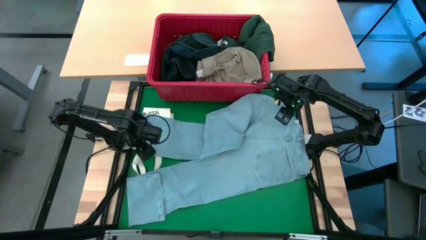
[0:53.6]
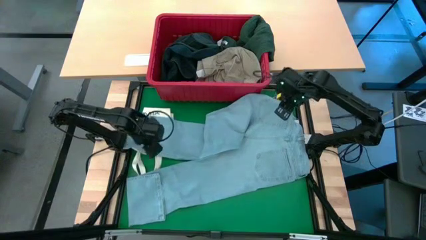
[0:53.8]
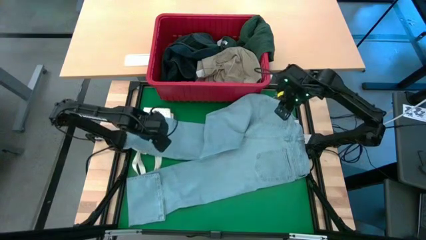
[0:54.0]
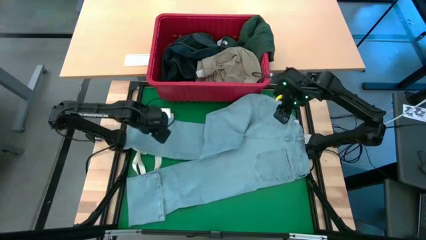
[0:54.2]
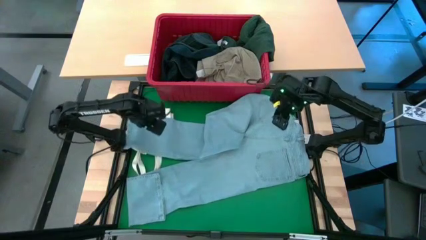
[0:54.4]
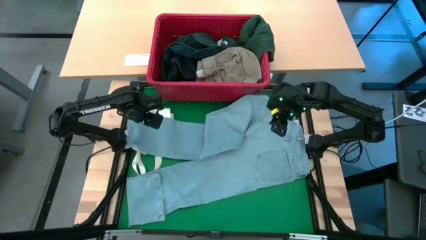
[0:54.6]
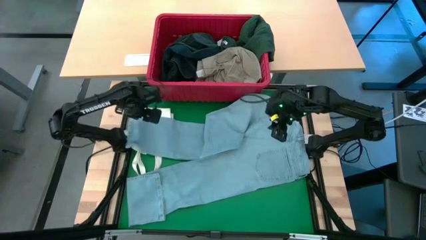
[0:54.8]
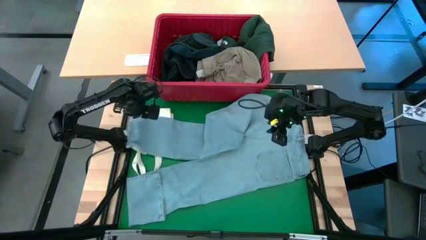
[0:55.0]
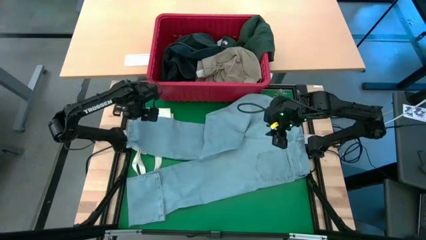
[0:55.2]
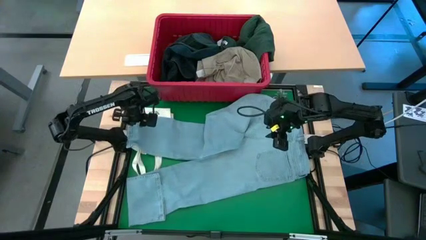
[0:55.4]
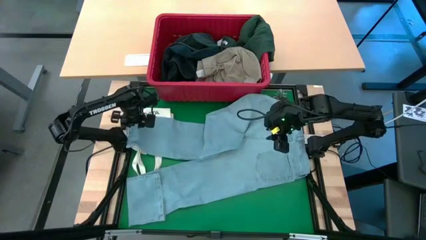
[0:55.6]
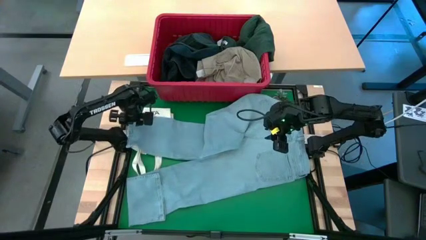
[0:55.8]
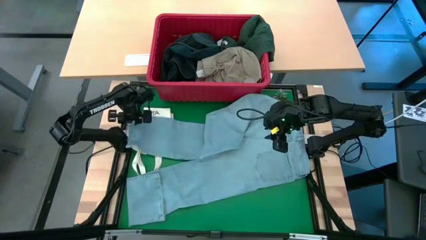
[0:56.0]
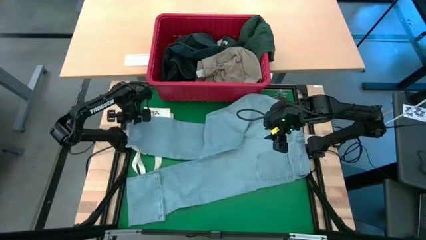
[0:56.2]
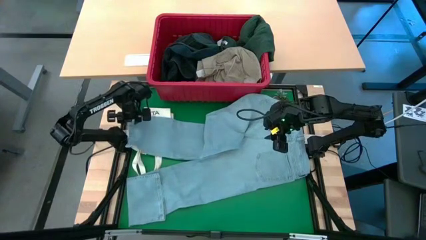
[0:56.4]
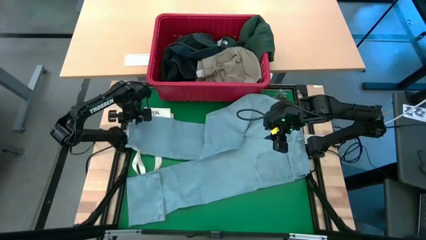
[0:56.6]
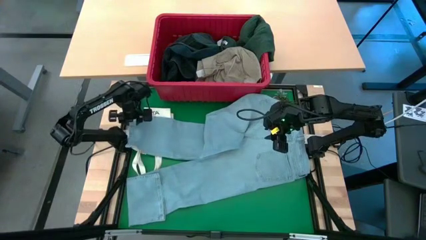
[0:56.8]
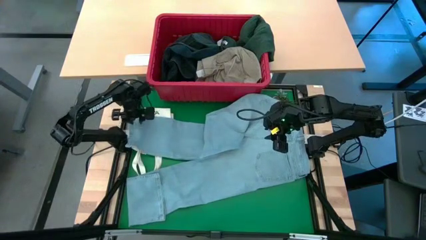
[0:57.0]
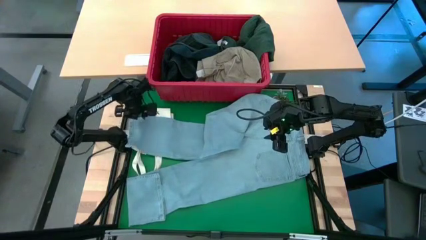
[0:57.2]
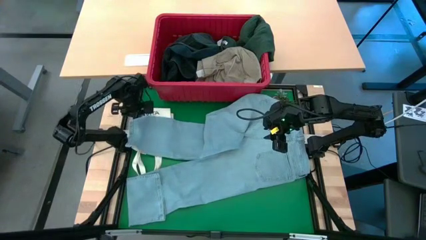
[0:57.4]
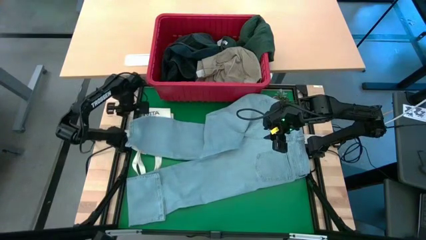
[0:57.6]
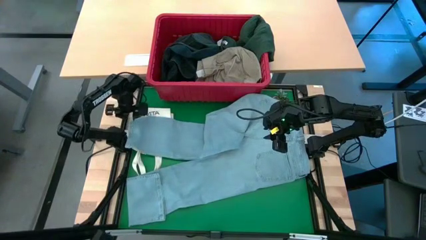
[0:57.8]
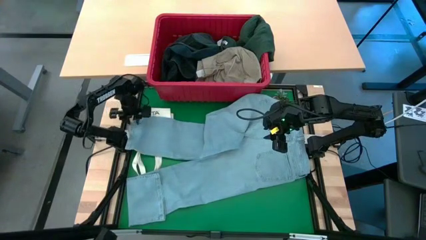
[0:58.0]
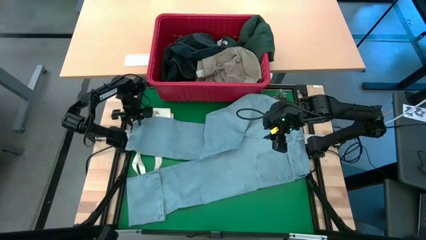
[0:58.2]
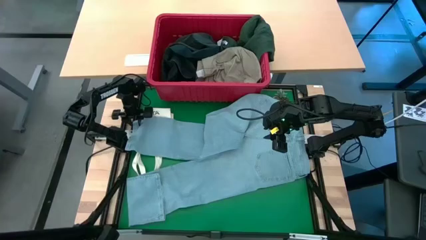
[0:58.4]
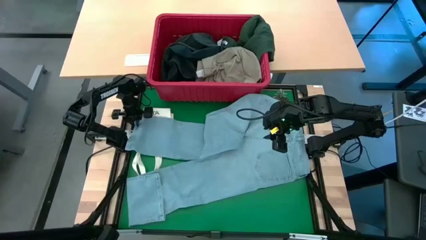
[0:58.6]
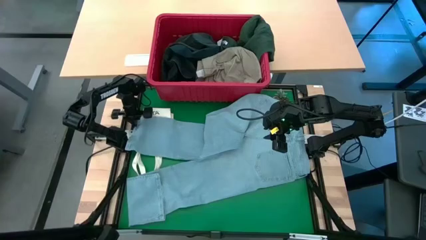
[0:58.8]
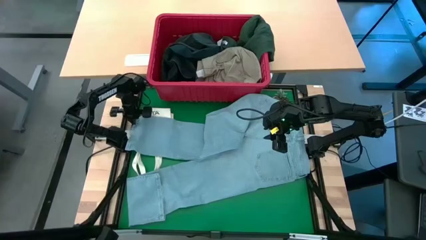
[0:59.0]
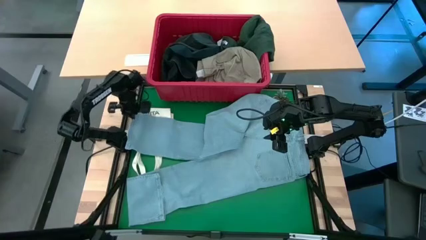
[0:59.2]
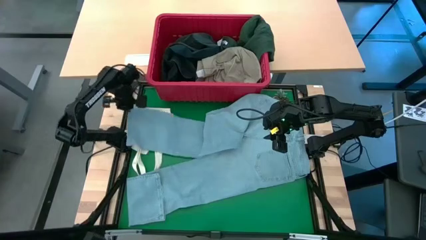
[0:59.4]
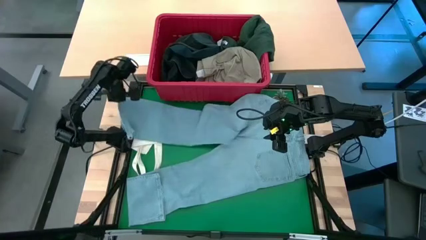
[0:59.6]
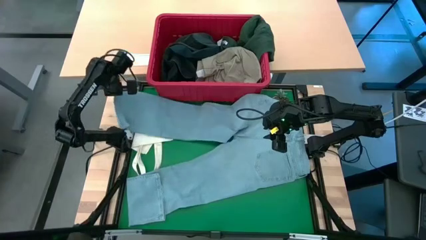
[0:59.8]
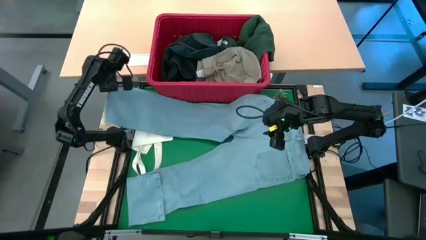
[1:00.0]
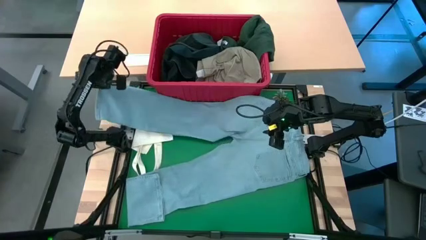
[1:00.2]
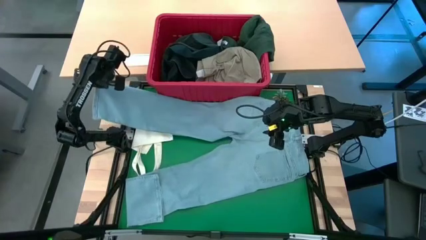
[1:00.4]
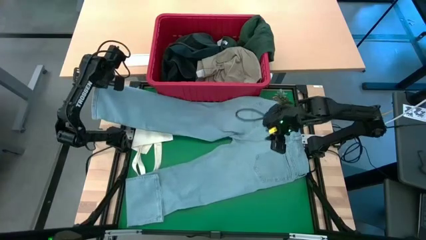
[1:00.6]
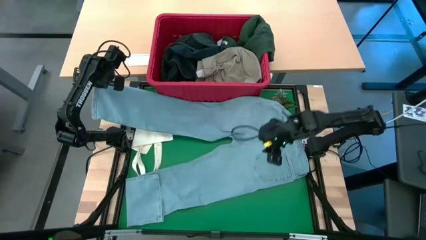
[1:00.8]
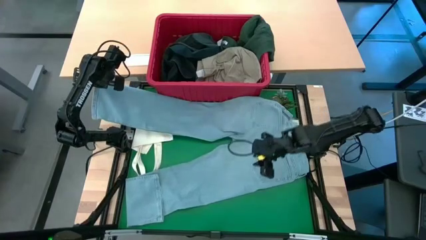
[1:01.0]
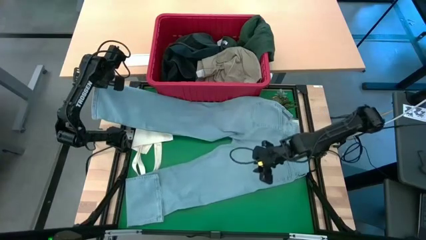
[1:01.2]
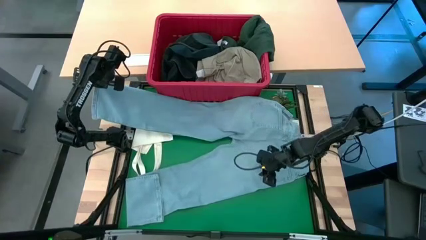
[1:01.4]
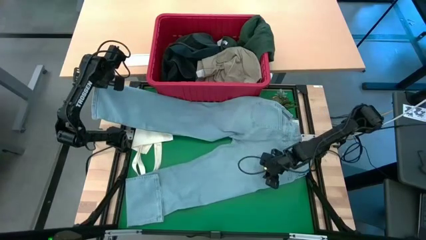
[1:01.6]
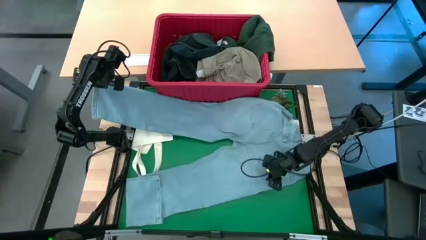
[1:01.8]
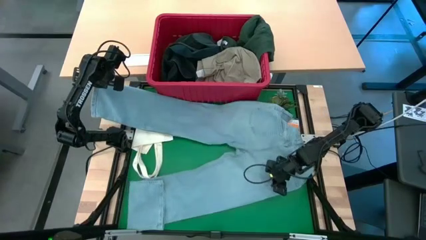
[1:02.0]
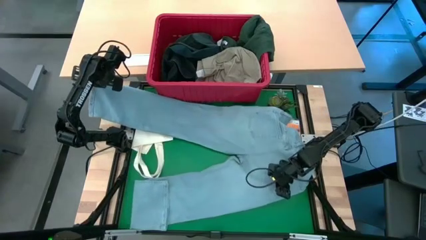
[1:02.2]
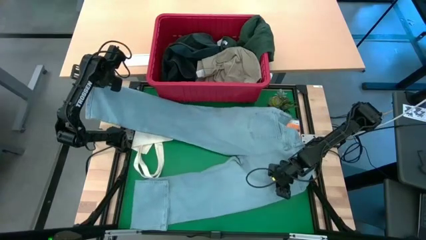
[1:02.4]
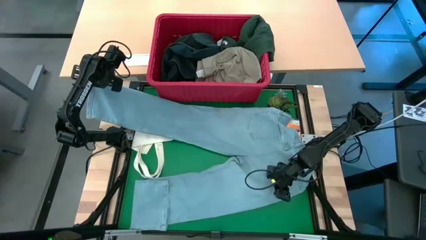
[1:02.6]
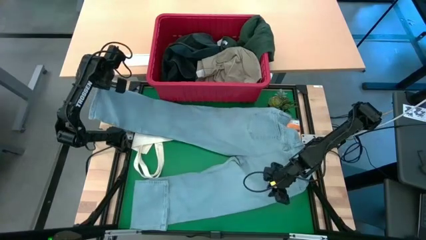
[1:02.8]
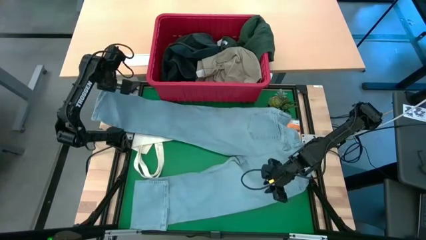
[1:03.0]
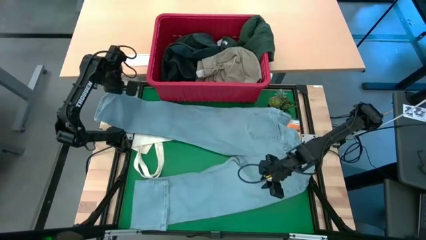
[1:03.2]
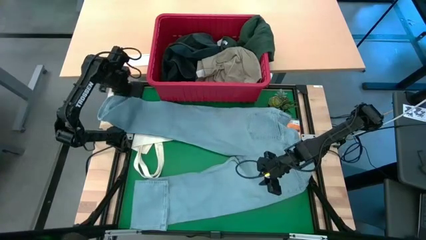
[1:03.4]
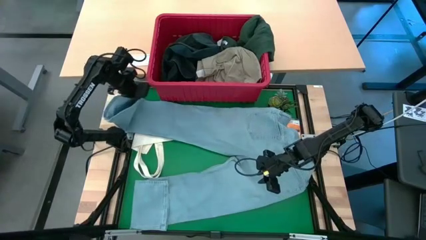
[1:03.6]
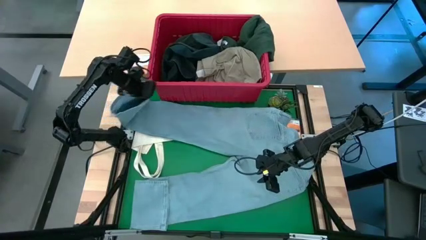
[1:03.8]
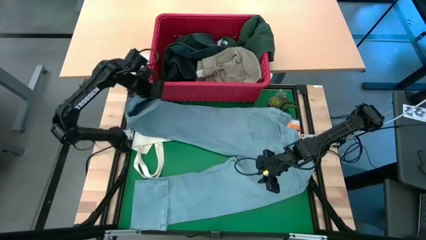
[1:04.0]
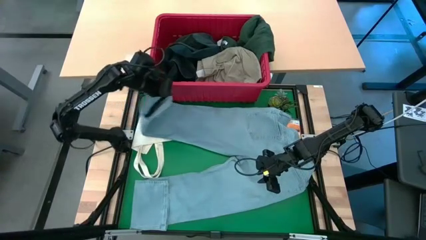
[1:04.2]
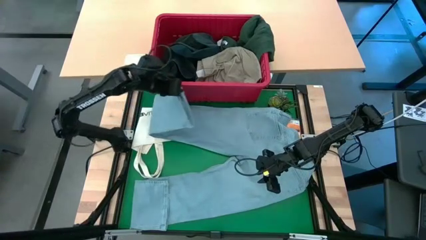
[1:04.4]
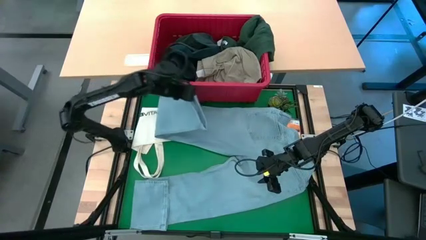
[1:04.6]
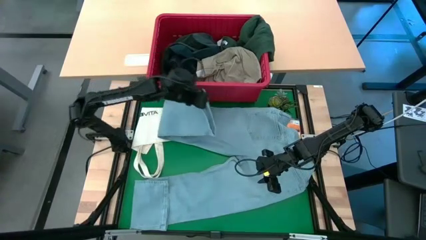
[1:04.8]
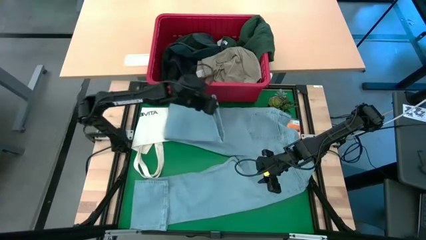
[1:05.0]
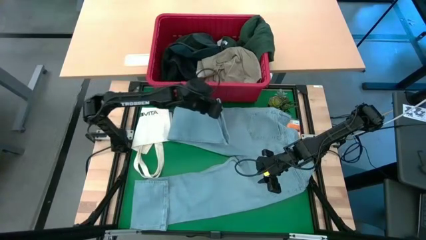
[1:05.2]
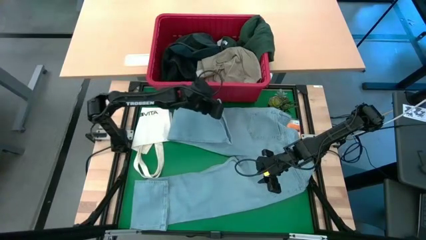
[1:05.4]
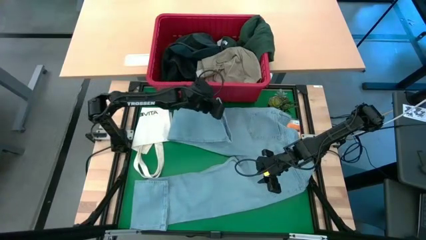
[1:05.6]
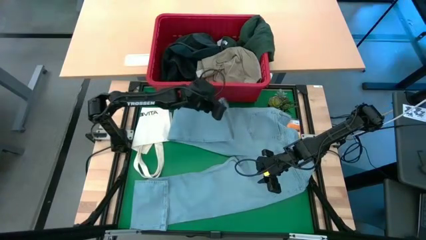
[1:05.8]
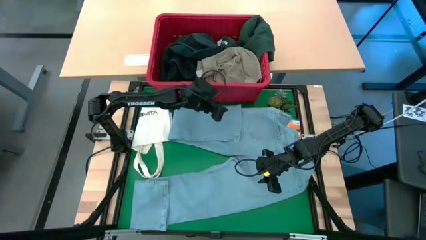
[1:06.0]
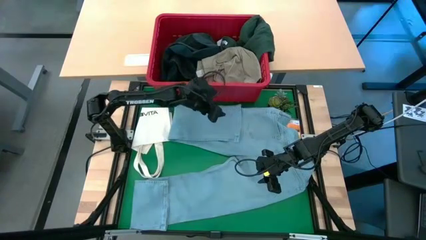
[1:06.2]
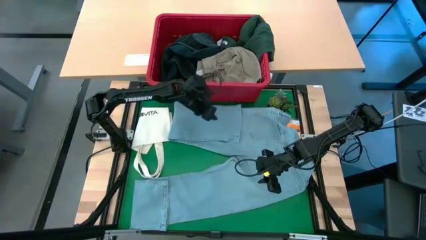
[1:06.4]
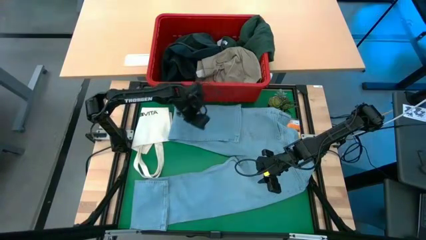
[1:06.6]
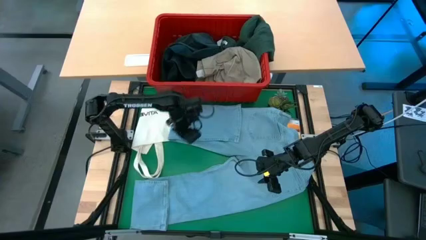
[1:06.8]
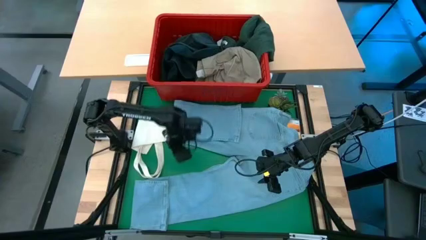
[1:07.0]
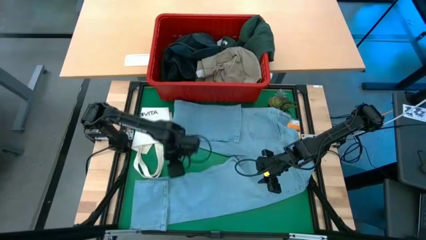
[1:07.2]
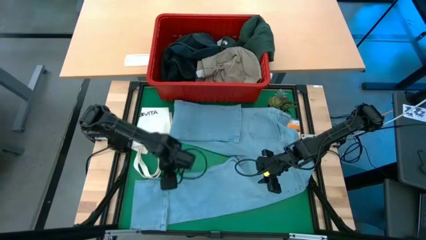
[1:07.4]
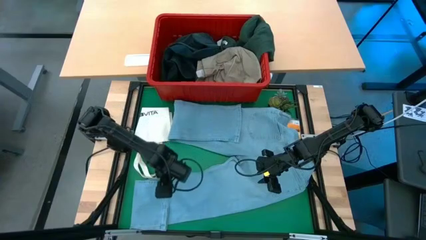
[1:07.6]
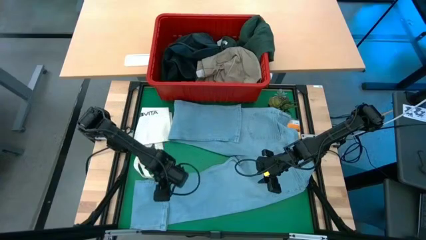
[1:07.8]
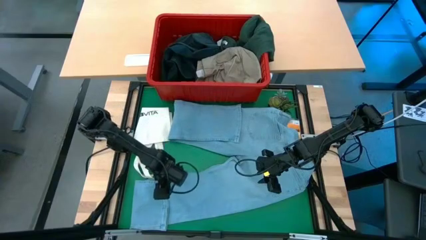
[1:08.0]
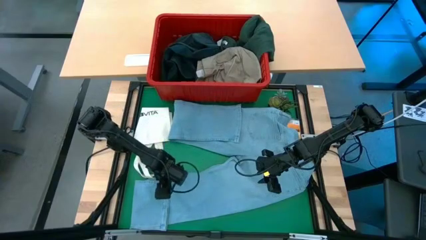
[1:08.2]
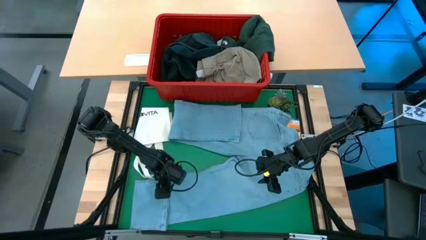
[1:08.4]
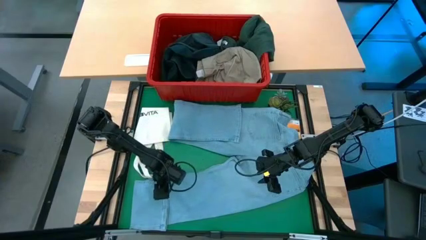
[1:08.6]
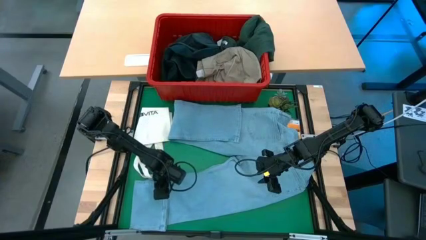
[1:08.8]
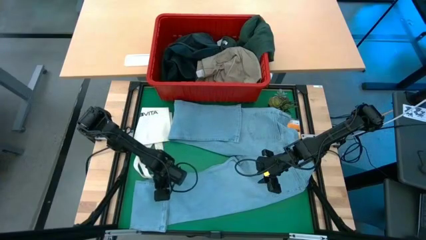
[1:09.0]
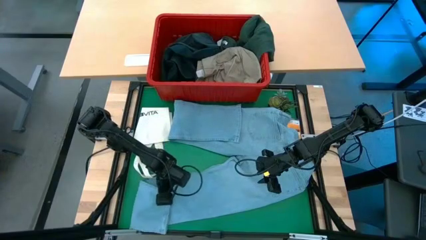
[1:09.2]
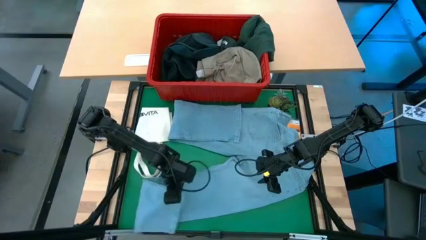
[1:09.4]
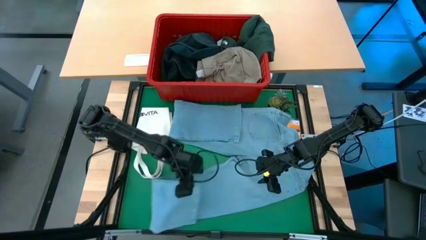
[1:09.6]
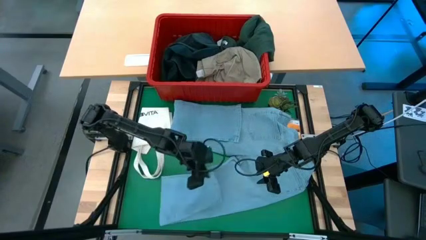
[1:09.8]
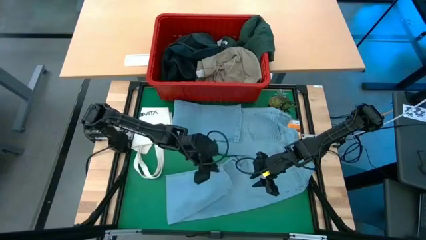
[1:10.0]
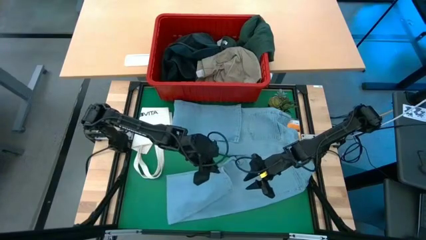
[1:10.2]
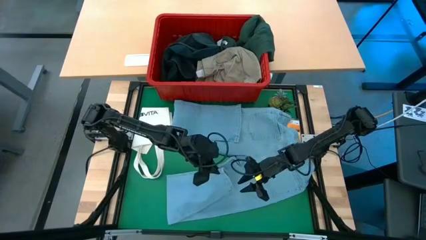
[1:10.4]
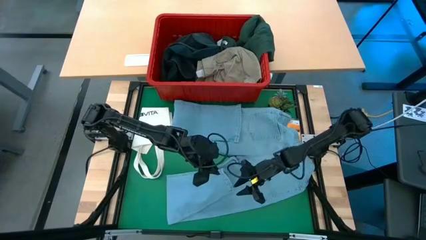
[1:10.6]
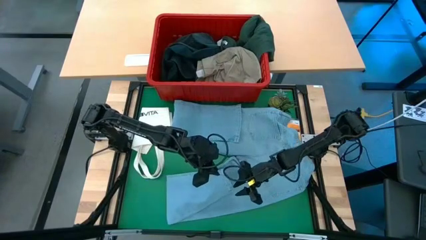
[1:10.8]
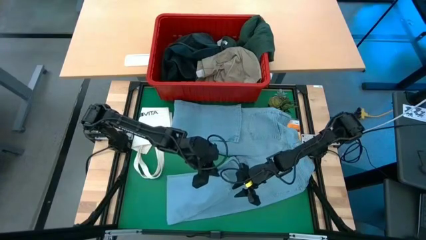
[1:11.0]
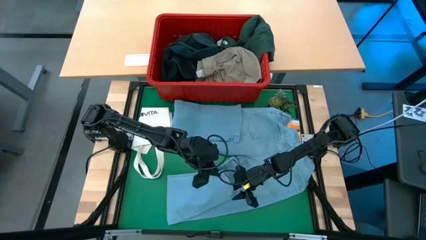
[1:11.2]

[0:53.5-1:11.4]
Task: Fold Laundry from Bin
Fold the light blue jeans
